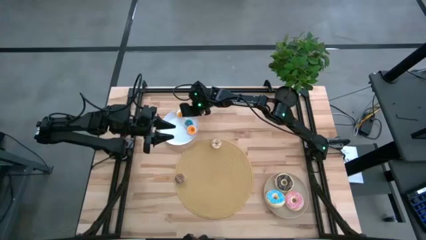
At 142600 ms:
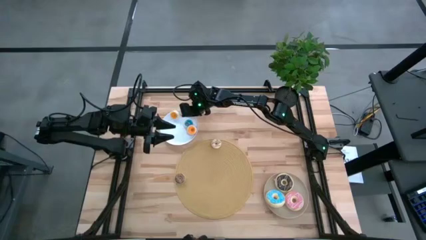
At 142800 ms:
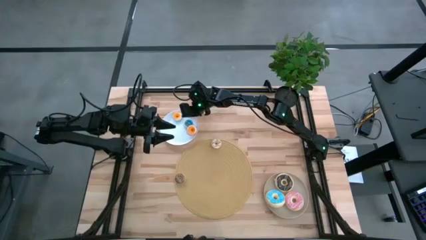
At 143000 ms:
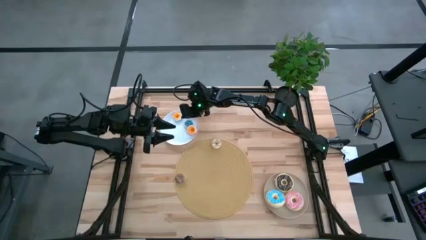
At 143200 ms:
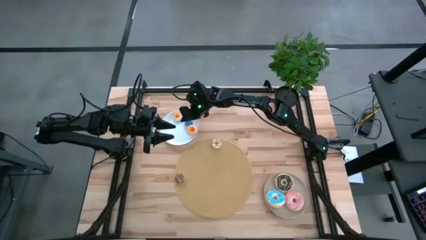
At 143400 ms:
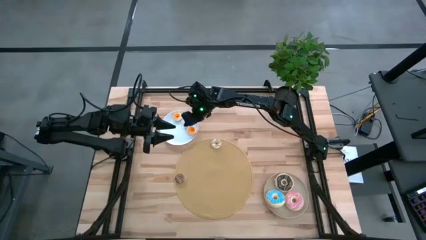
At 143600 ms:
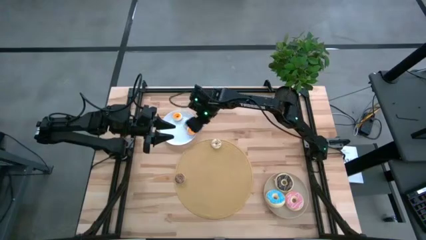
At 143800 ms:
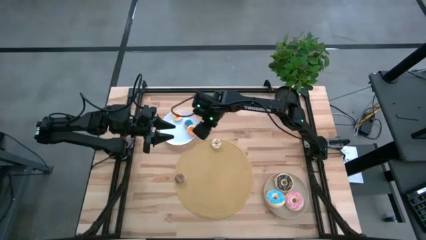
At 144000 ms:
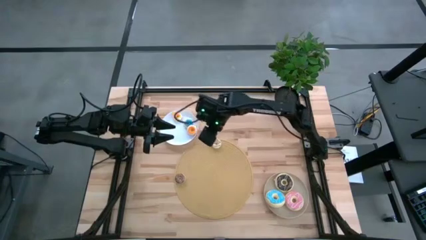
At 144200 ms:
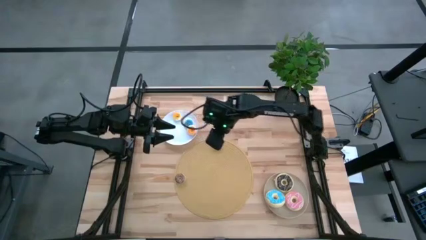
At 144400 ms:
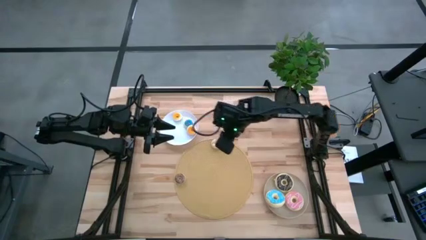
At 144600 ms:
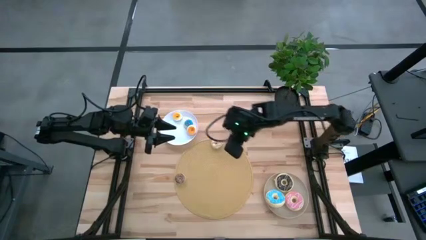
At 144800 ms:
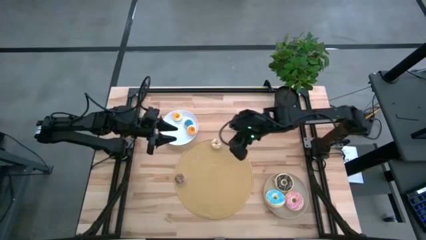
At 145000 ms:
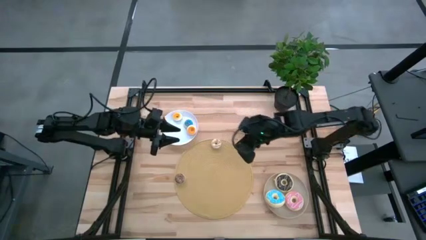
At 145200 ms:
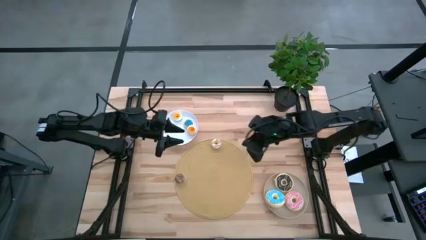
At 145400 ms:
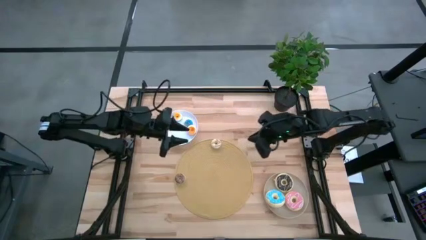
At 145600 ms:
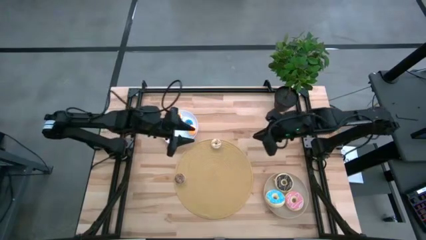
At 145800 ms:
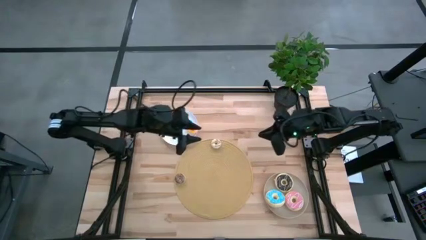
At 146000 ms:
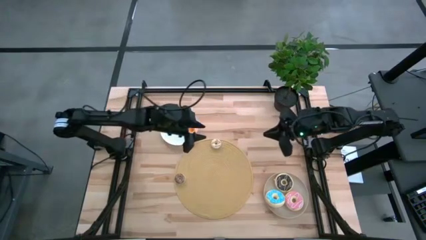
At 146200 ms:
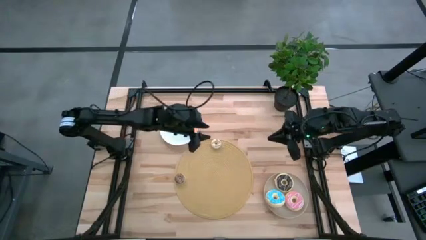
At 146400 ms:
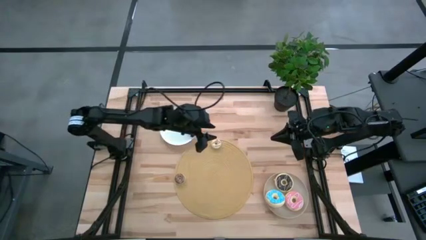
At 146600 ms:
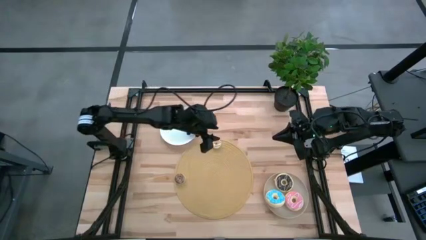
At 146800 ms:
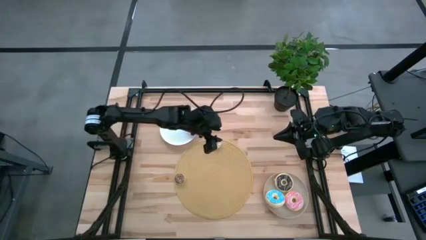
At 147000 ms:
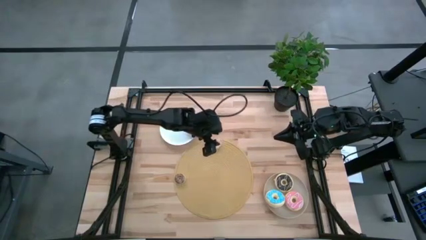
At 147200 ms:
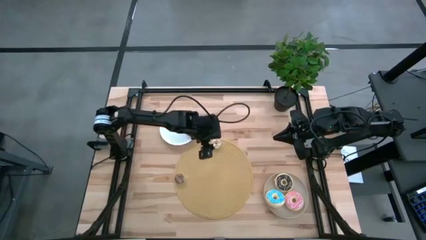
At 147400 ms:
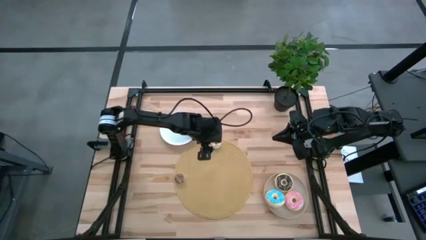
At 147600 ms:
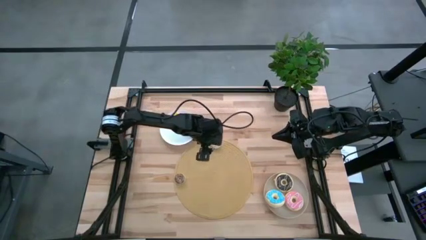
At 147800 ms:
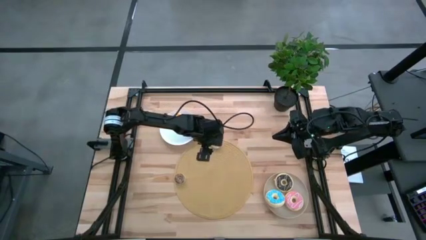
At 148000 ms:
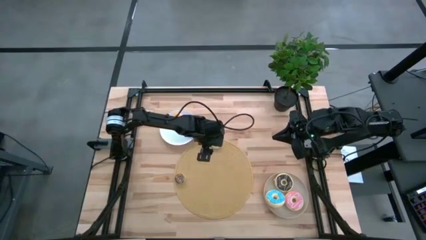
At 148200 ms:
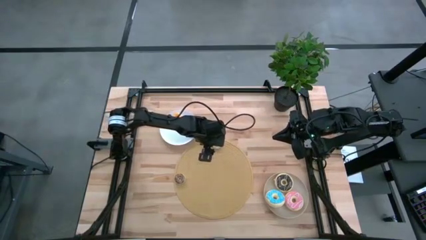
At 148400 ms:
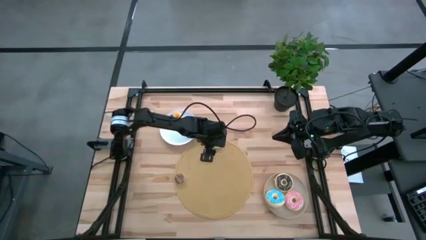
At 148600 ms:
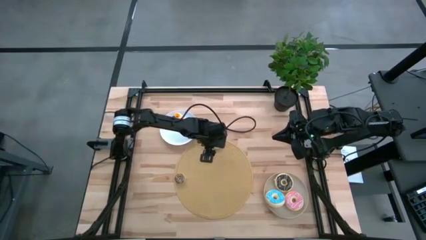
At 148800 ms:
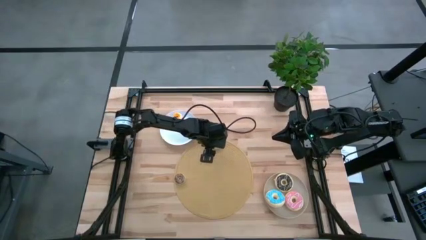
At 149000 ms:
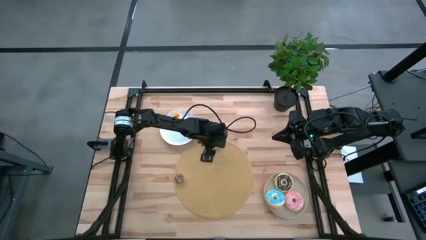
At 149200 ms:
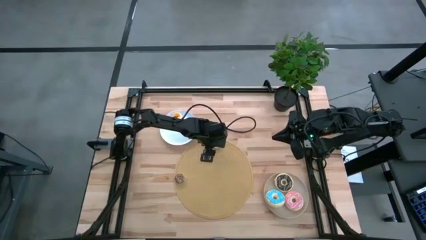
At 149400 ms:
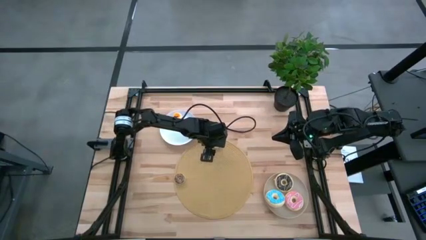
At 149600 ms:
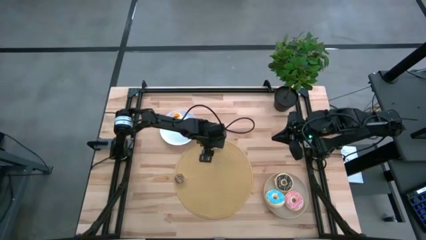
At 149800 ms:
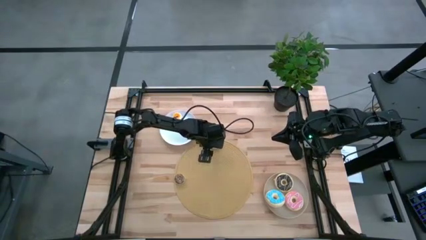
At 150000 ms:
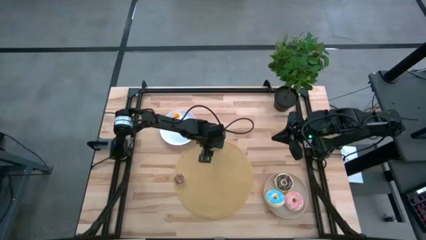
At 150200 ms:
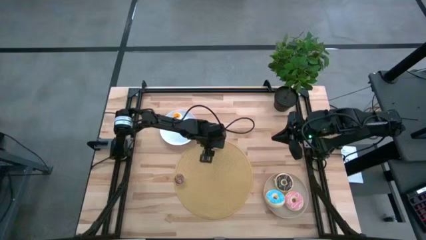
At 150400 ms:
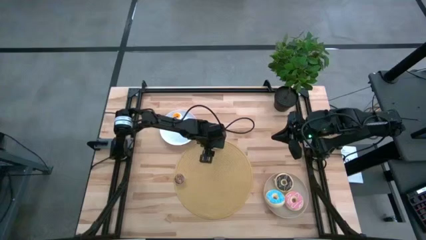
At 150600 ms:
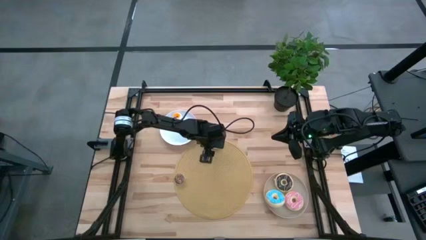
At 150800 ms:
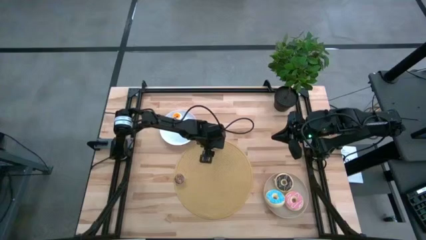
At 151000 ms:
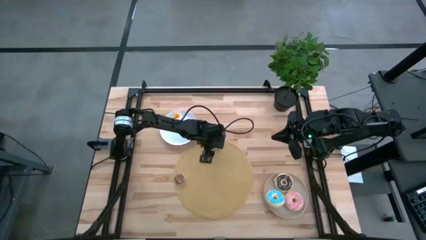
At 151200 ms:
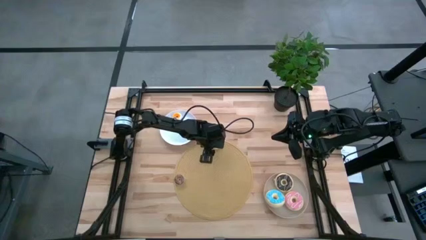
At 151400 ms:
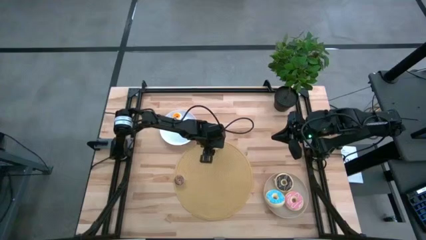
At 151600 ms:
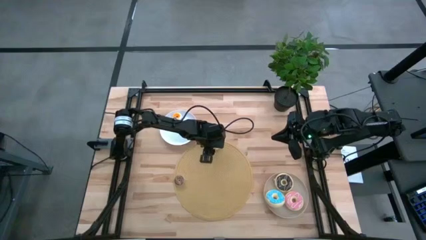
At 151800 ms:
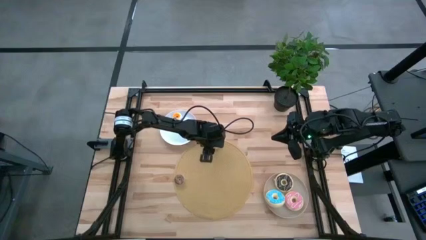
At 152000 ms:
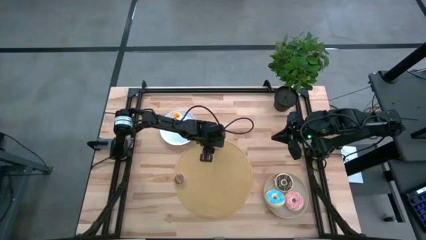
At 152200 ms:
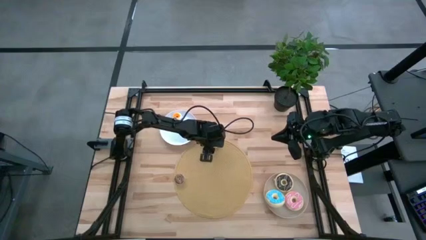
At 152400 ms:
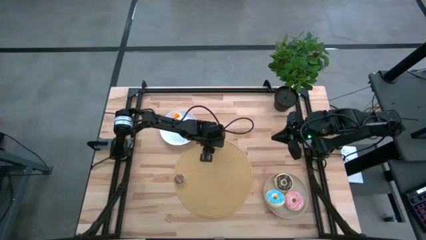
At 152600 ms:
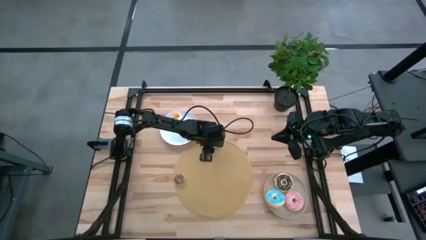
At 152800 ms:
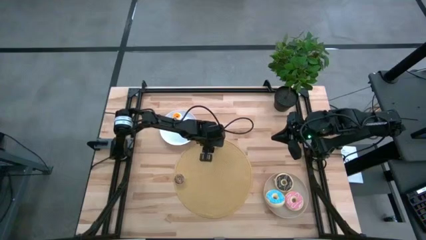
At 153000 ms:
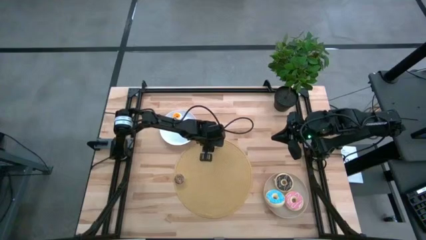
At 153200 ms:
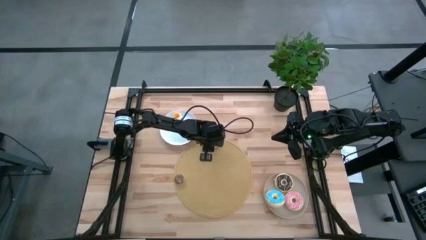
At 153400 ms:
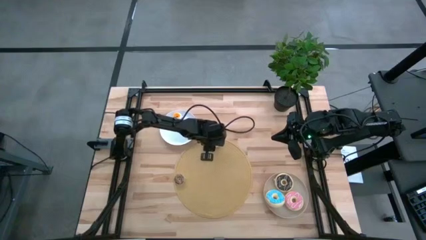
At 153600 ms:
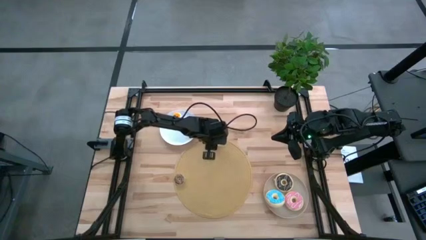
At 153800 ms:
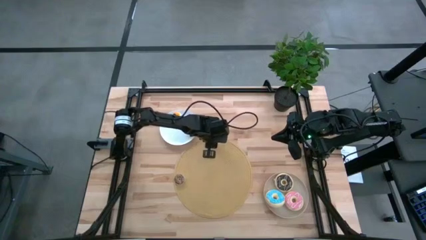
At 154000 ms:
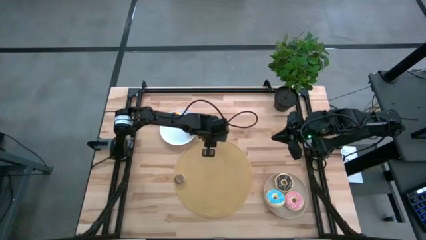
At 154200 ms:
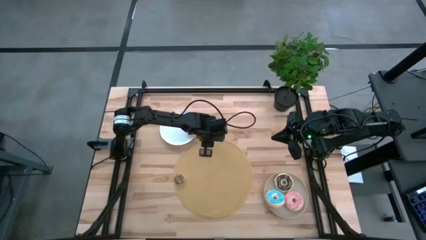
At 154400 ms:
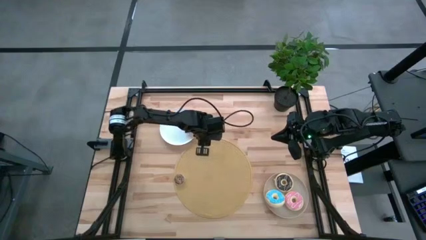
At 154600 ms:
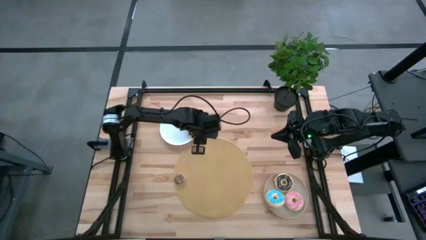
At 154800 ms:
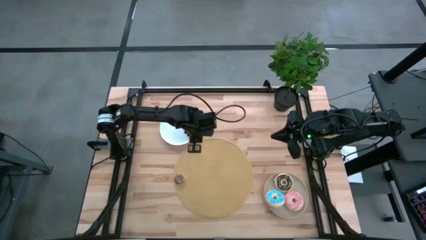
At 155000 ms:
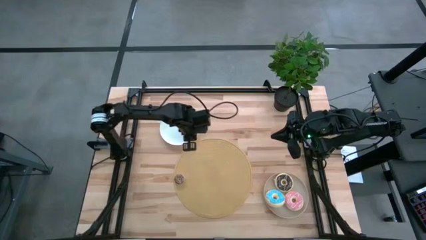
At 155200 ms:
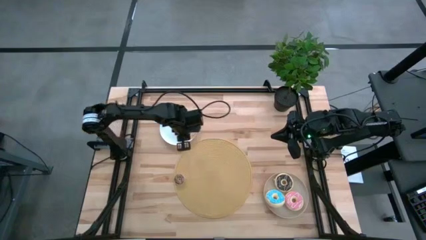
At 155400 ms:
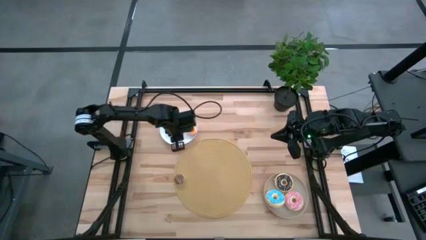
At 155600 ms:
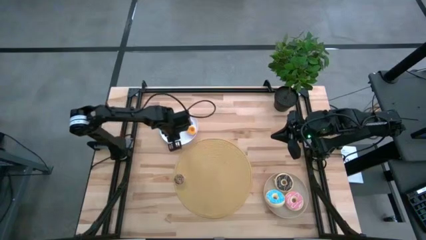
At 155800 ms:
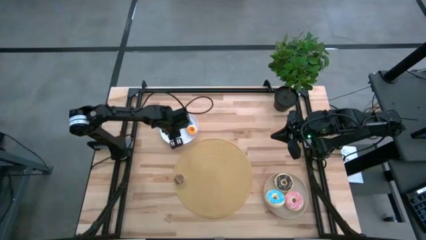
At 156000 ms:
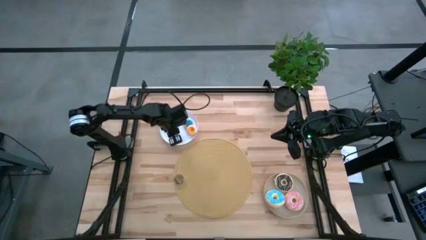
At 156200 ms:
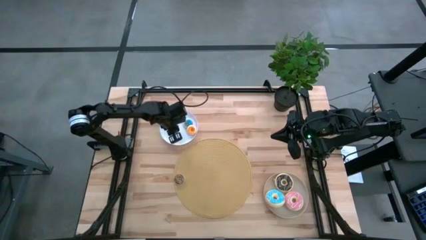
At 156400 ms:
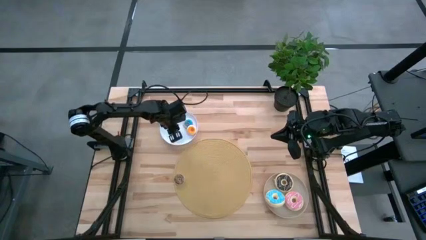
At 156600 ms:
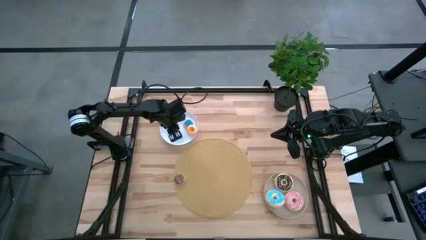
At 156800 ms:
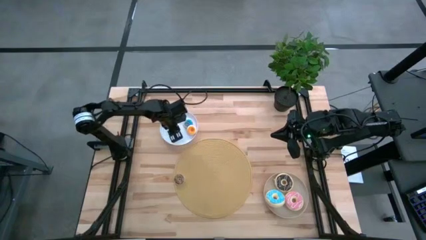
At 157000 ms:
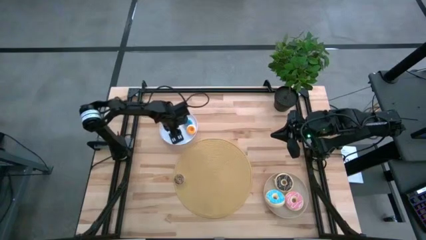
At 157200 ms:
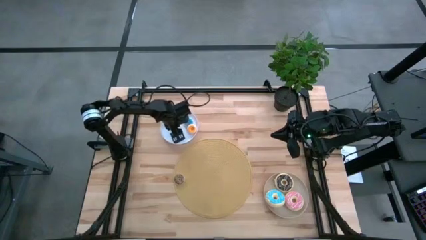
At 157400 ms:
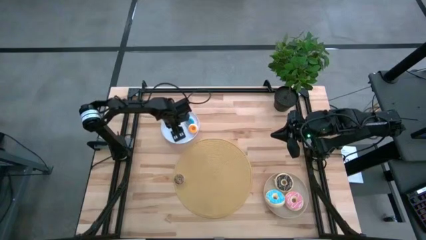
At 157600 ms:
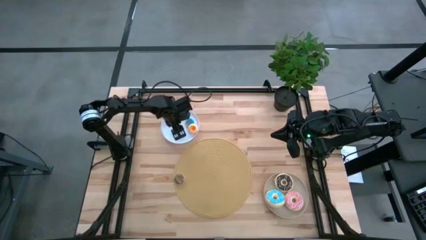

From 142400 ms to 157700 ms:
Task: Pick & Place donuts
Put the small white donut into the white plate
